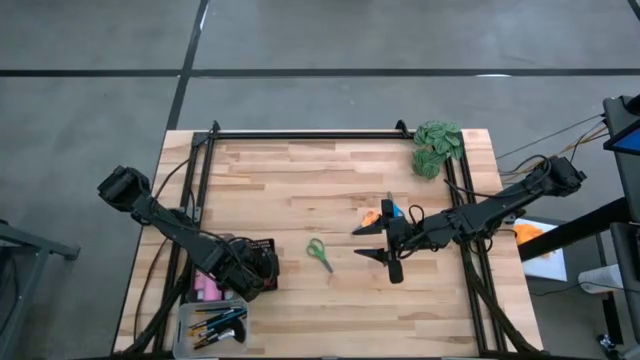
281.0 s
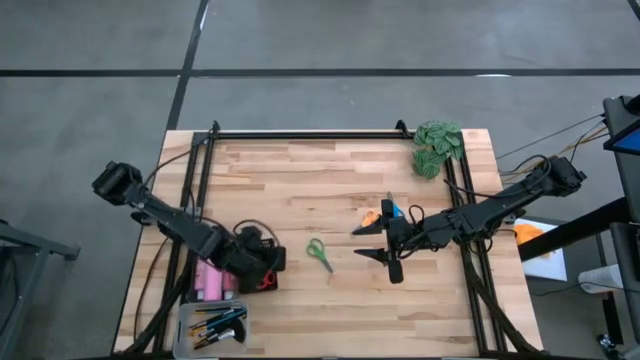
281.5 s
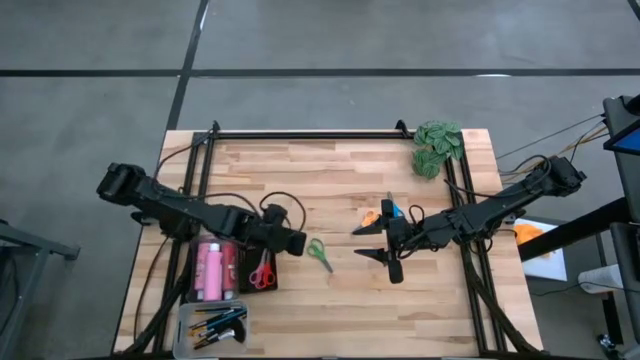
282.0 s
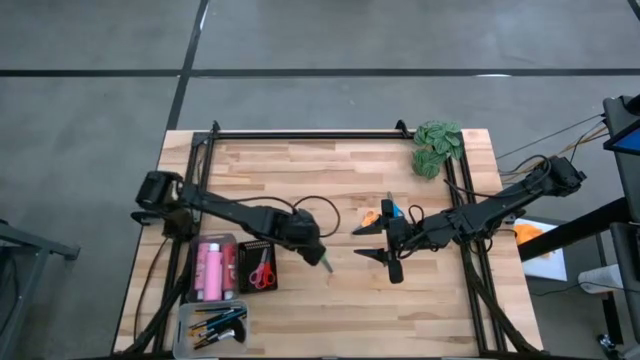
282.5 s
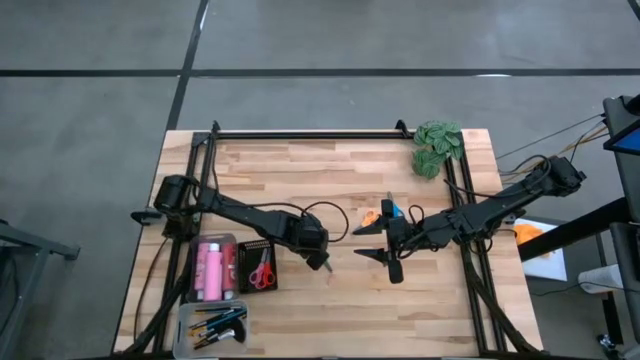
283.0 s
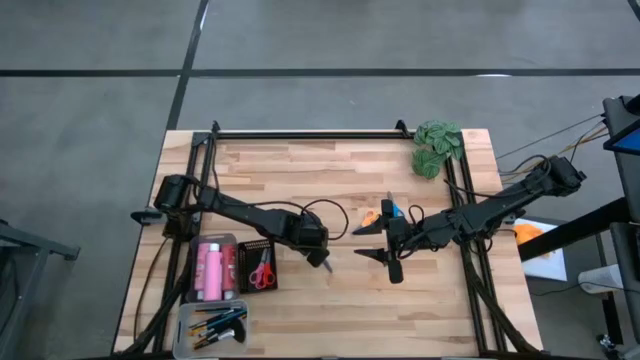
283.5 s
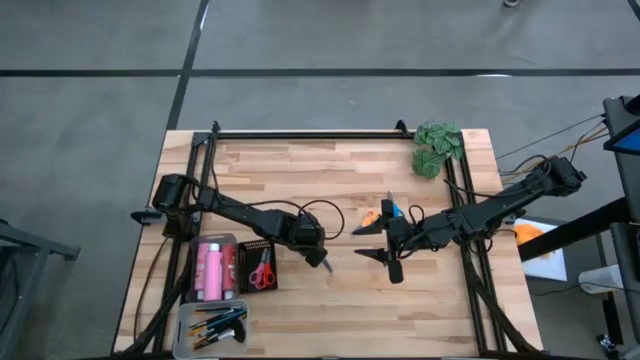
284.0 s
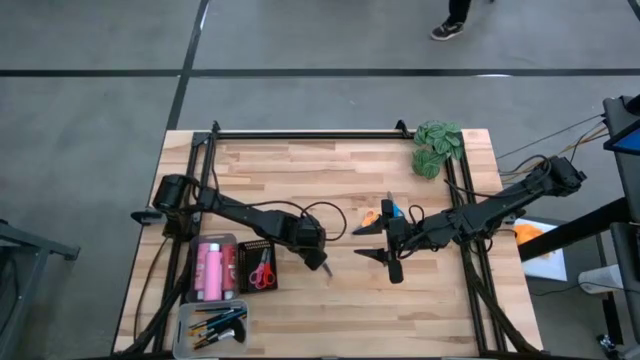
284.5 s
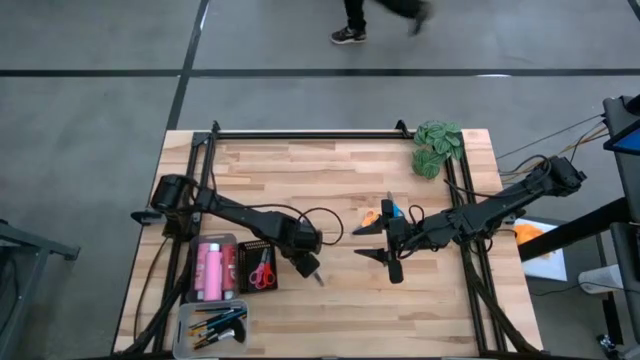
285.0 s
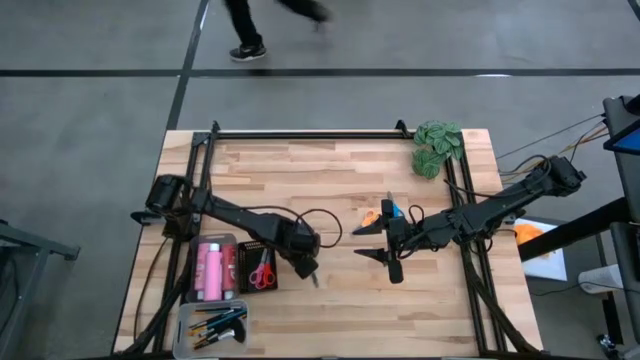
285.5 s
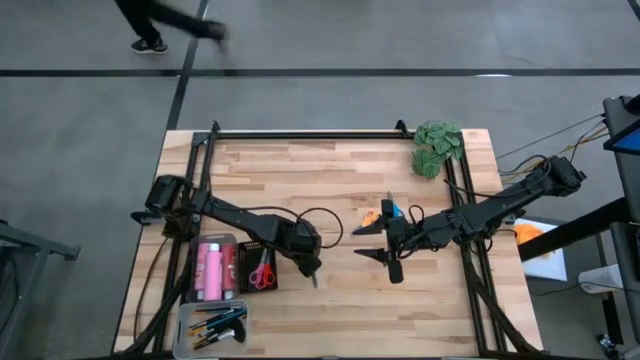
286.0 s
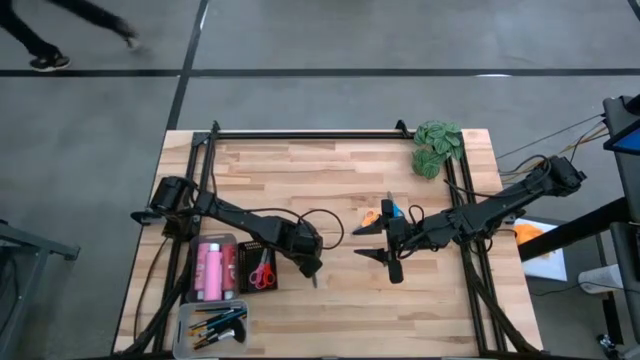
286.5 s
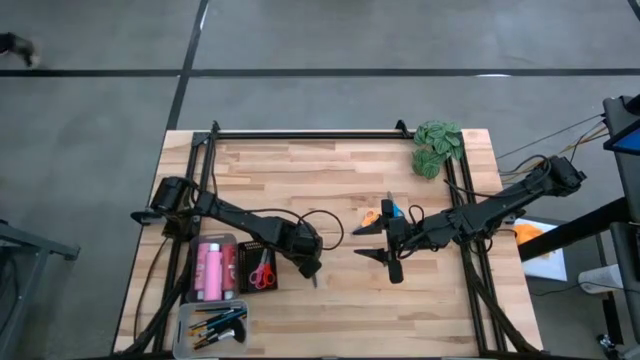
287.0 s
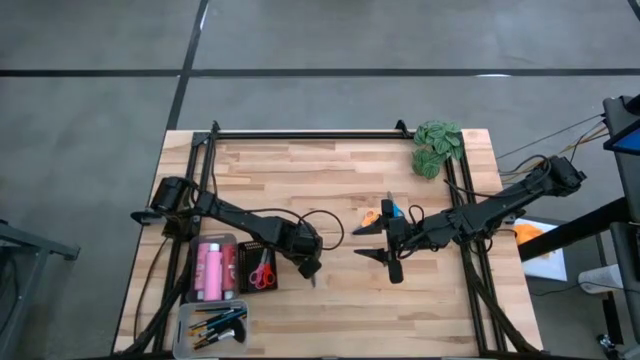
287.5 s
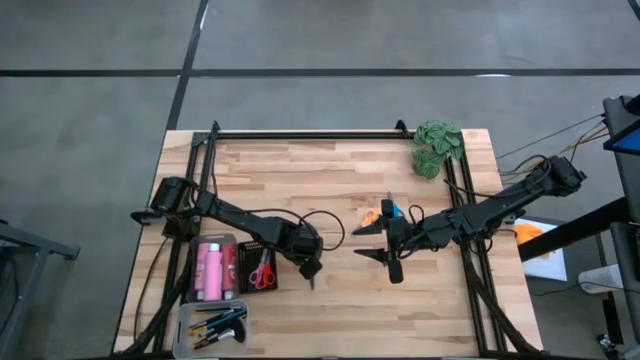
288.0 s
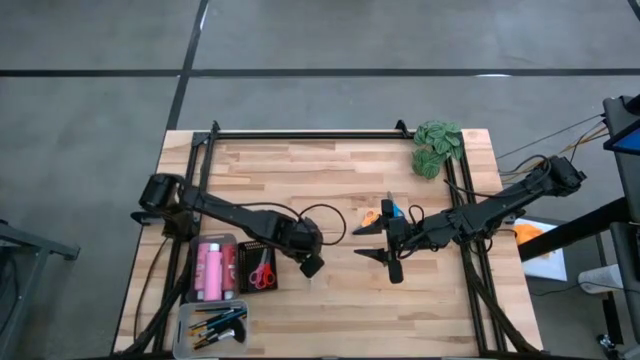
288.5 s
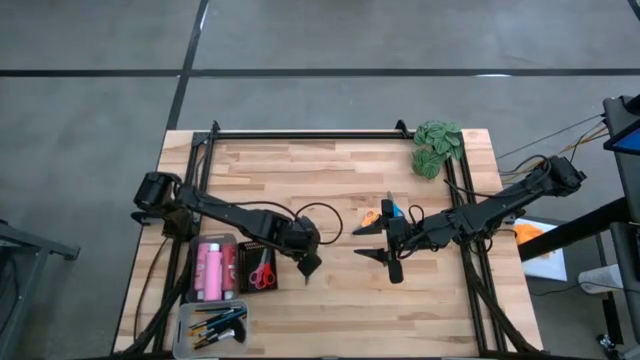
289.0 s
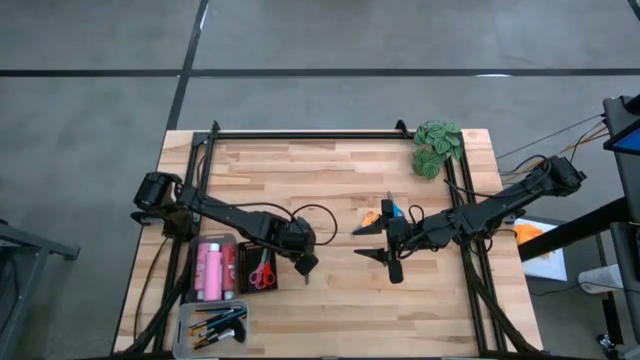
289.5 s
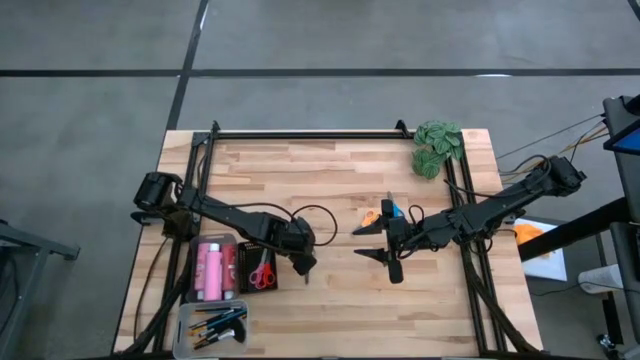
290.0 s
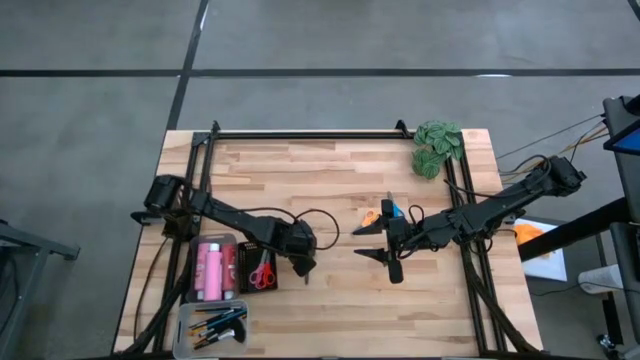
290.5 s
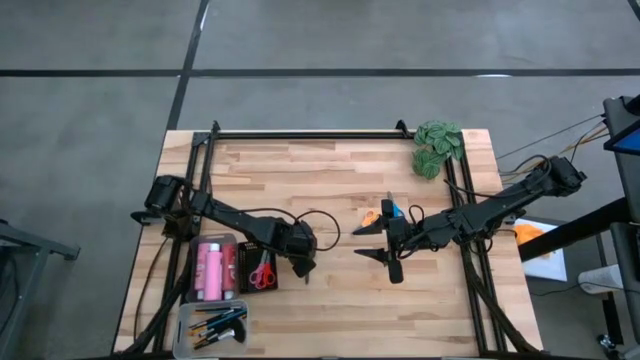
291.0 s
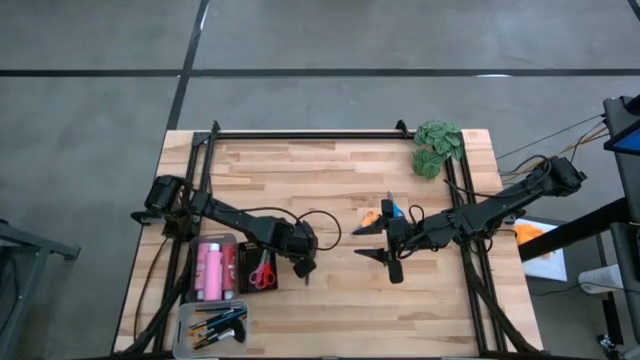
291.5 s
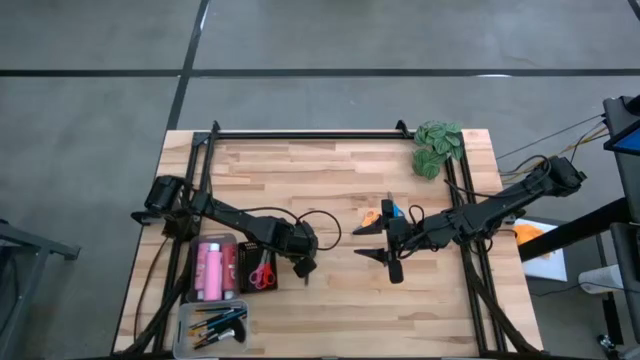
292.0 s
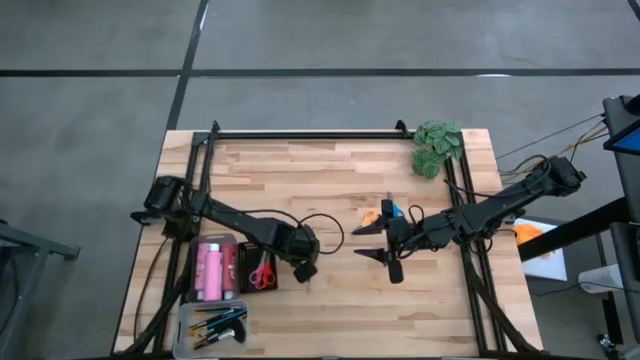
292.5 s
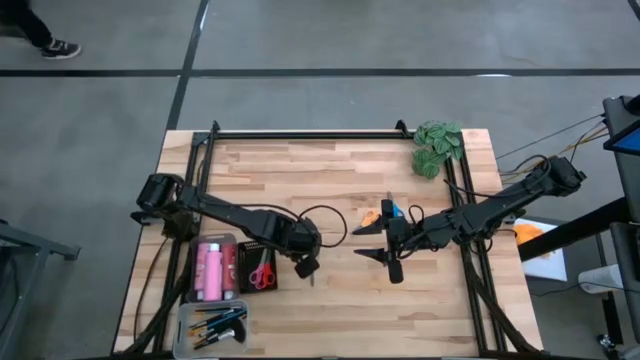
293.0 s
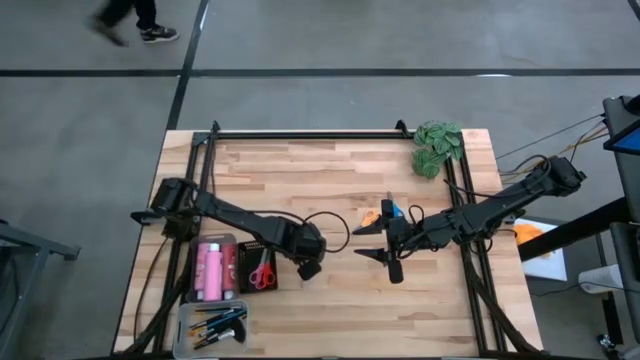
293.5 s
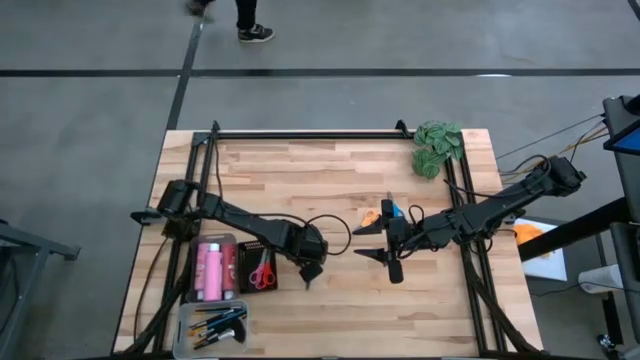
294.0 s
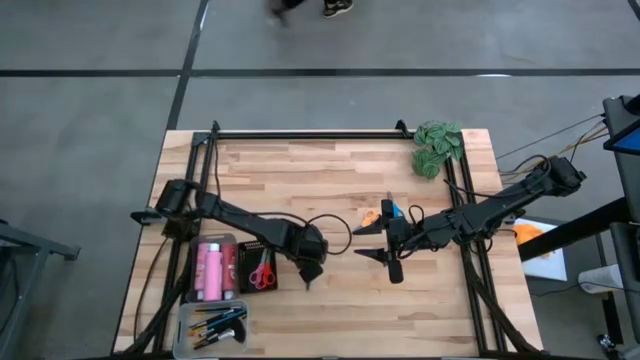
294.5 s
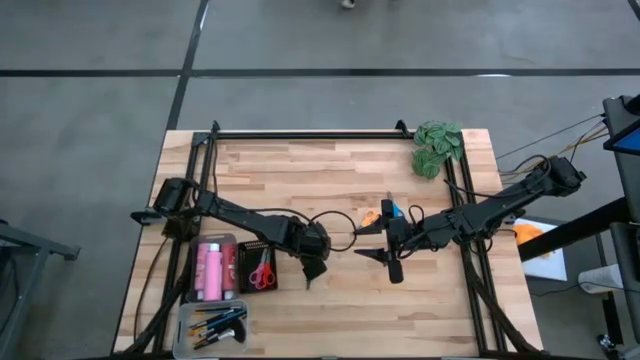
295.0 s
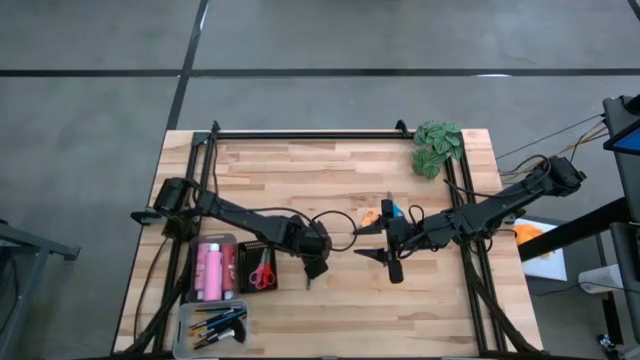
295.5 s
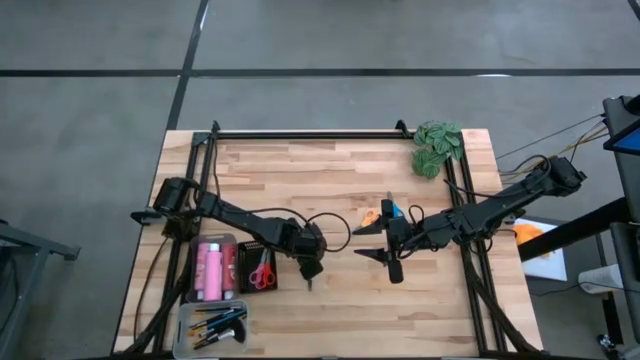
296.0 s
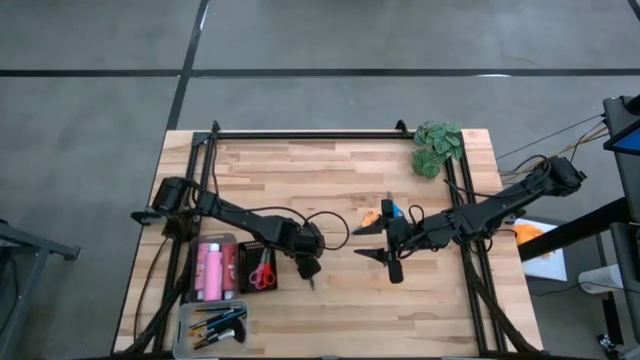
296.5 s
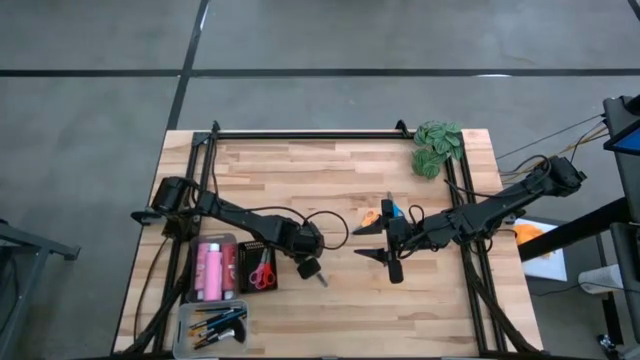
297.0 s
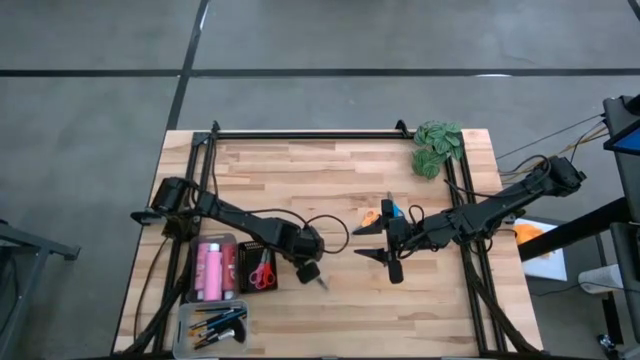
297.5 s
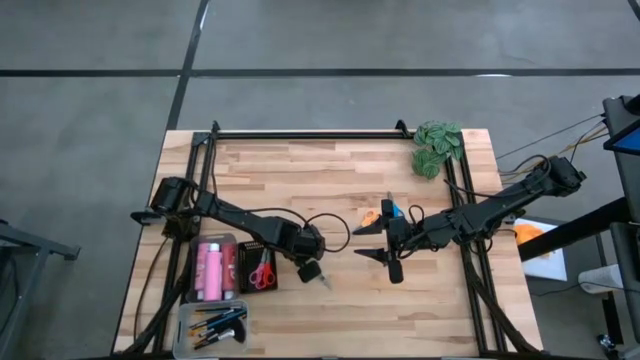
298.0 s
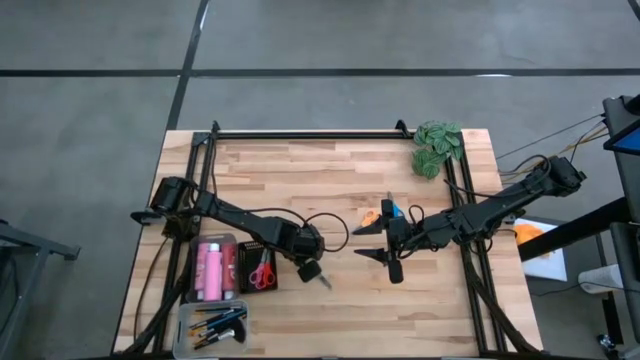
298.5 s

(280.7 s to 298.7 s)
Task: Pick & Place Paint Supplies
Put the green scissors into the black bin

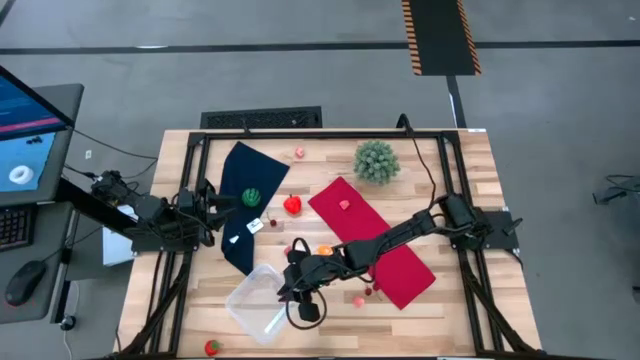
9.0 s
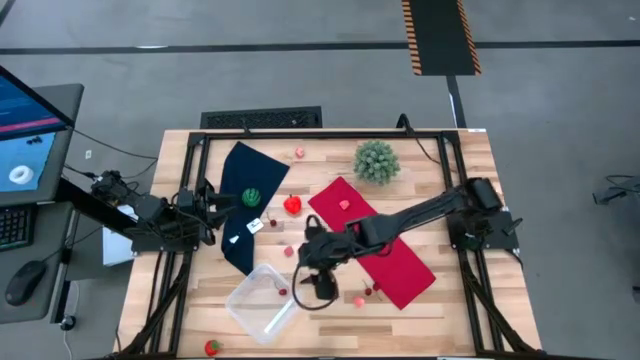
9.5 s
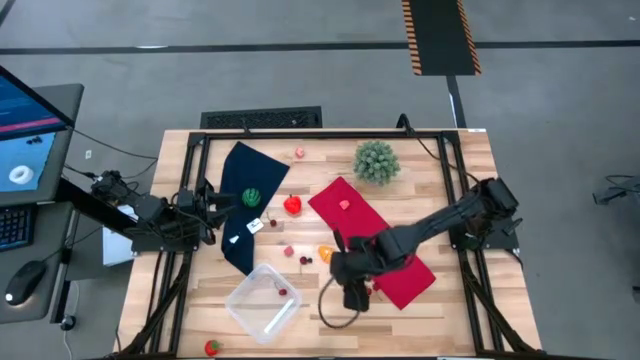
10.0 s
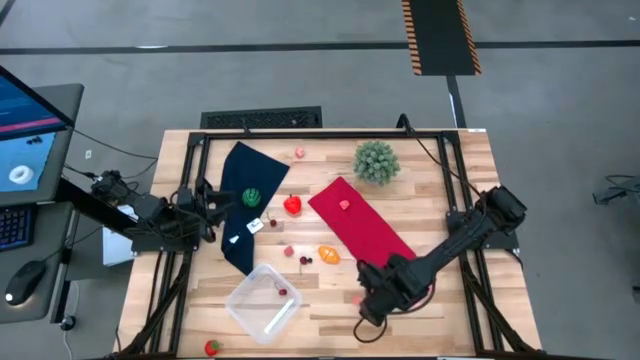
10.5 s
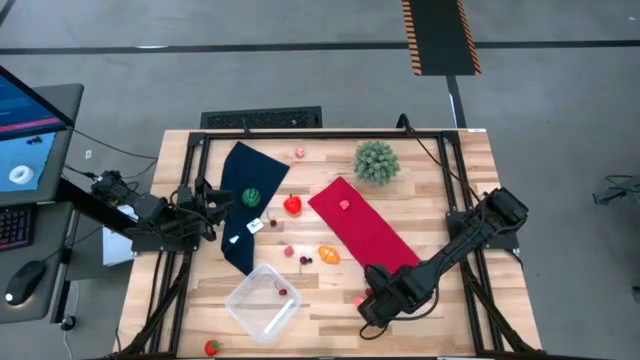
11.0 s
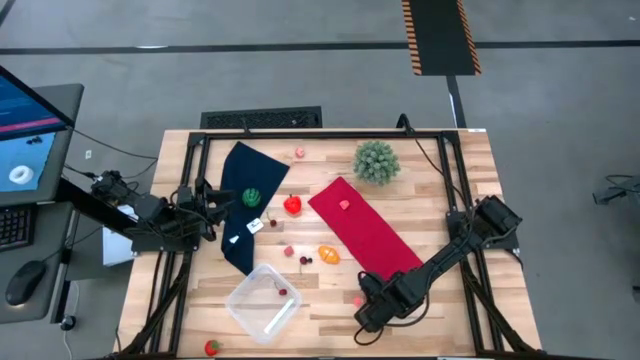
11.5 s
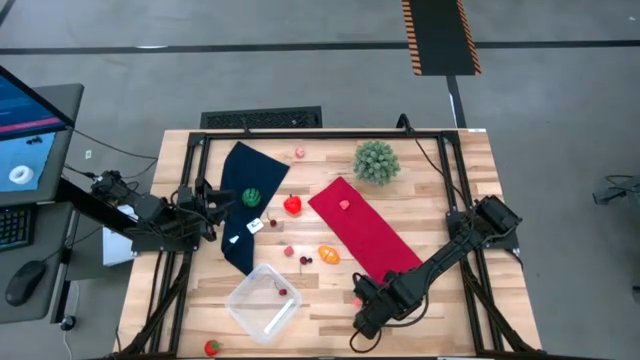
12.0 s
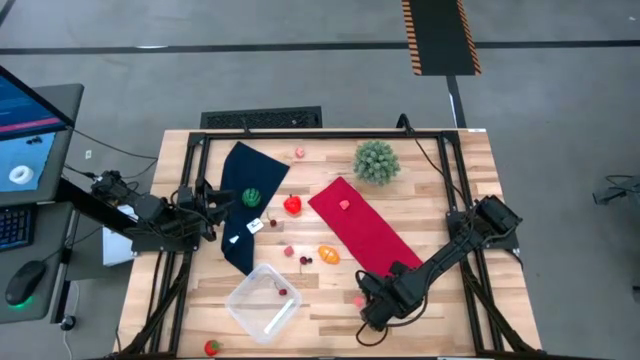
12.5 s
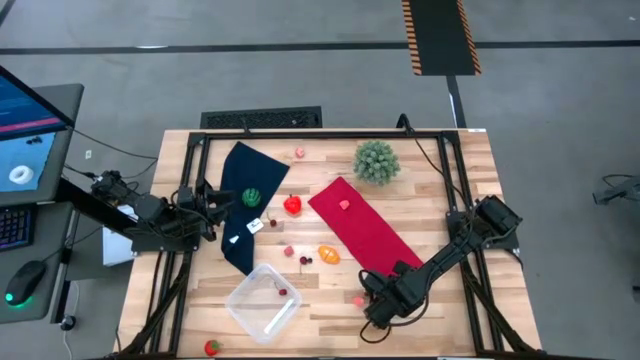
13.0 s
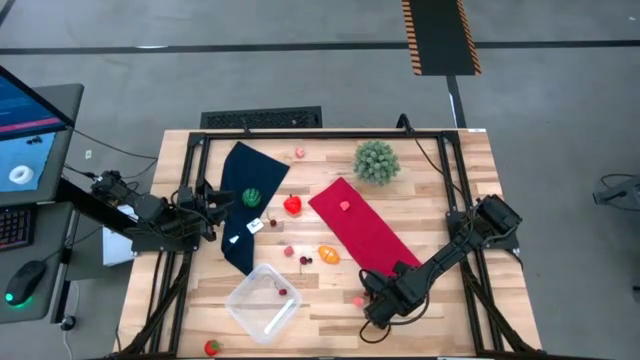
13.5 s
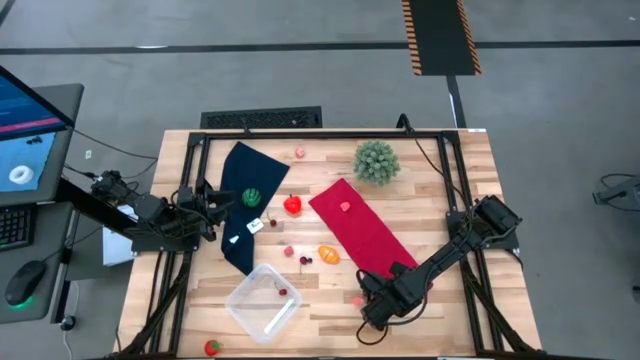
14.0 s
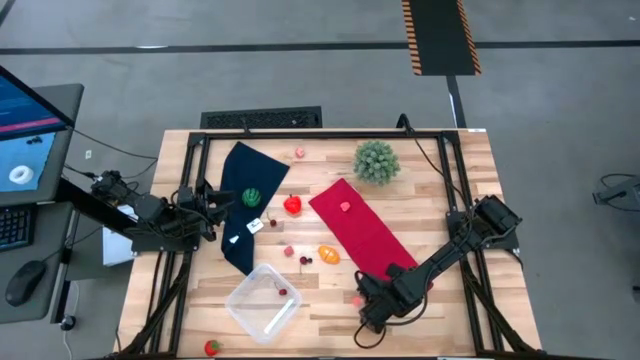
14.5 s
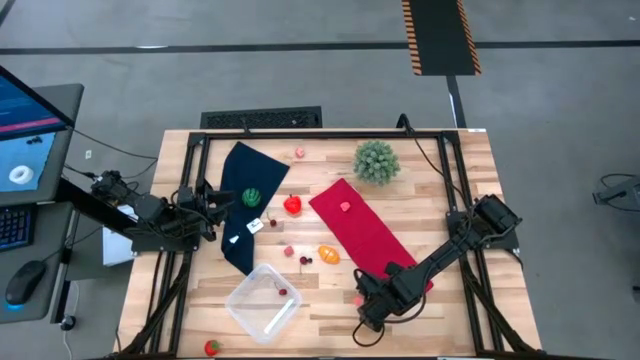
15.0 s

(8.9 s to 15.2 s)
Task: Pick and placing Produce into tupperware
Put the cherry into the transparent bin
